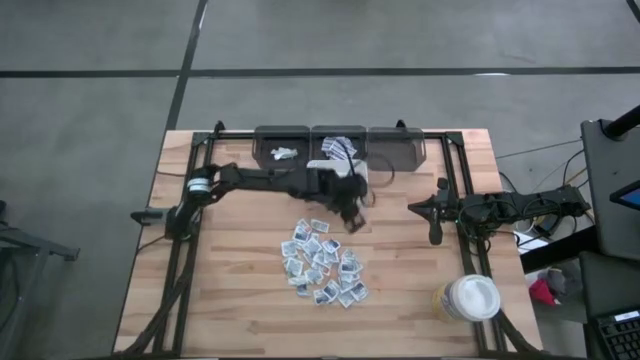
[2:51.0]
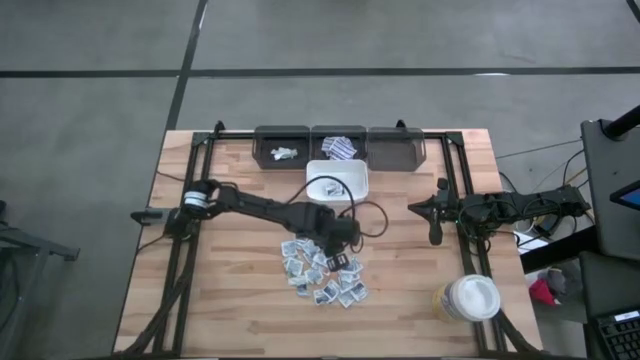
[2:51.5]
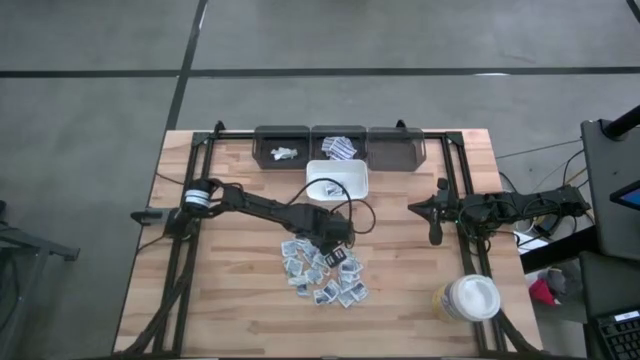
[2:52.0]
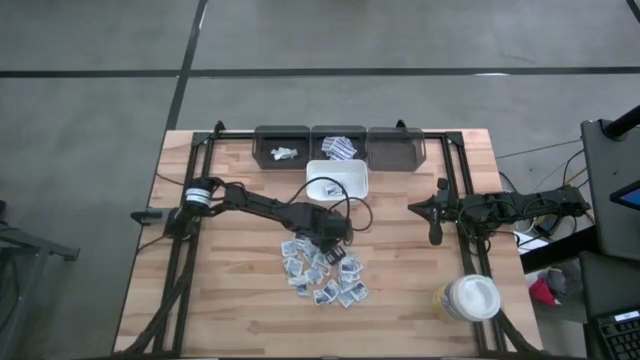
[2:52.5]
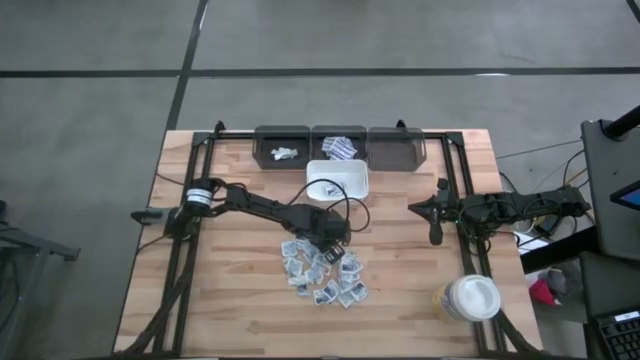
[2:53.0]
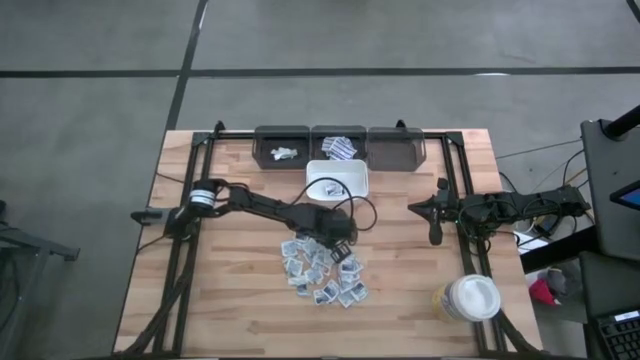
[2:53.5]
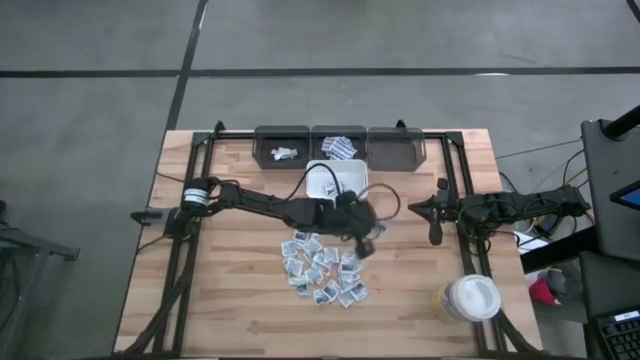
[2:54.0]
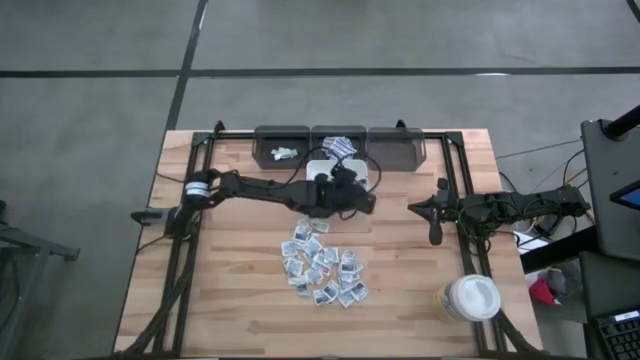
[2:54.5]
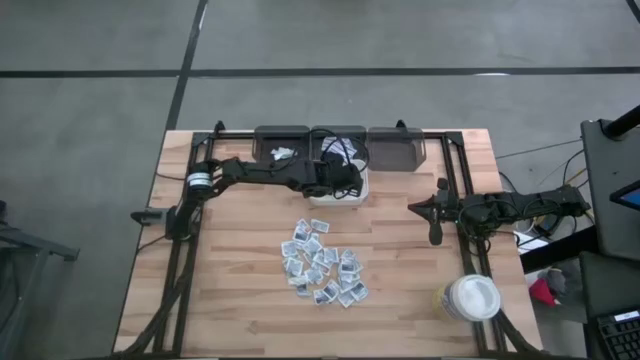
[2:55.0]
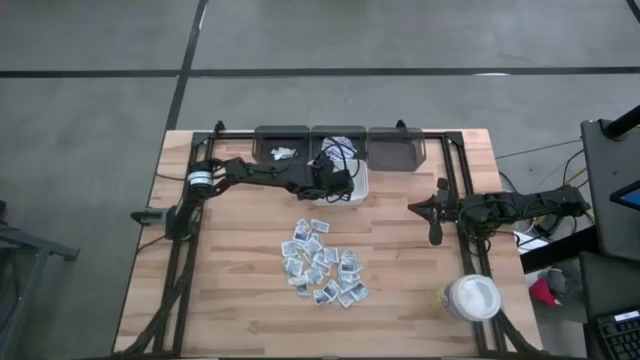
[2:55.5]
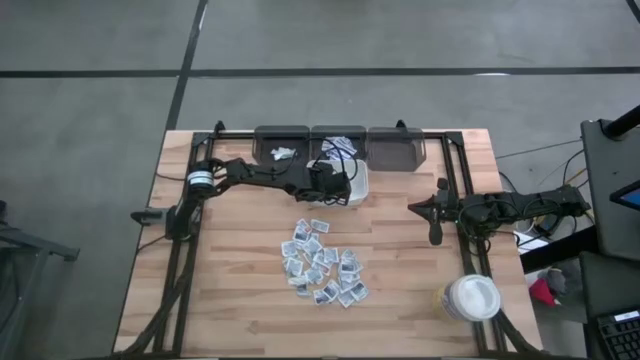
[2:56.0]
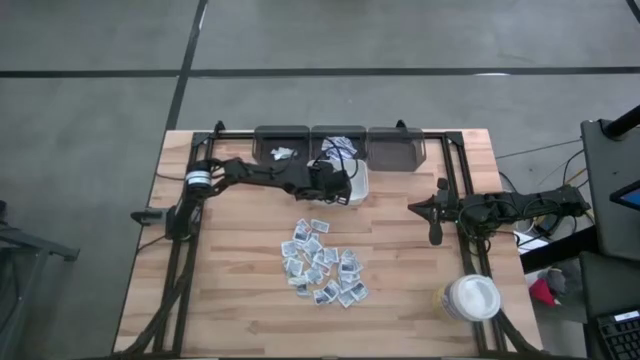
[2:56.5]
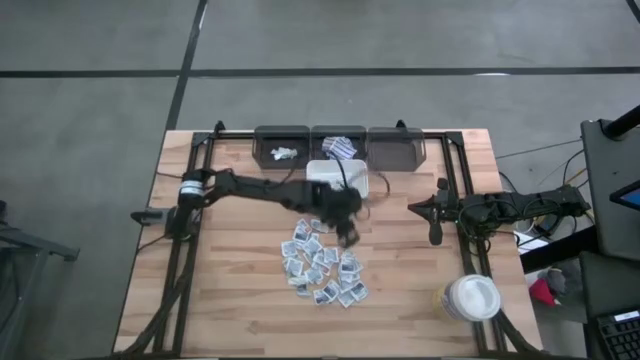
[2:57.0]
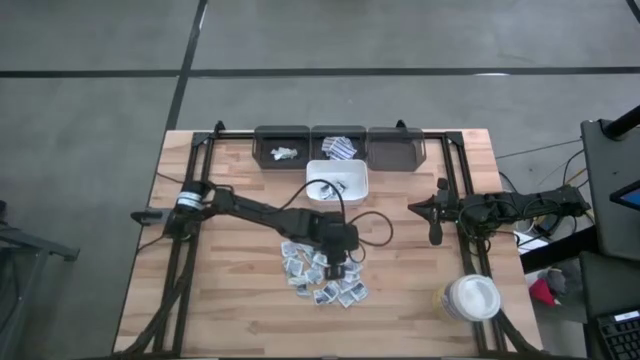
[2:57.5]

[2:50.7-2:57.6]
Task: Pick & Place First Aid Supplies
Put the blue alcohol pad into the white bin

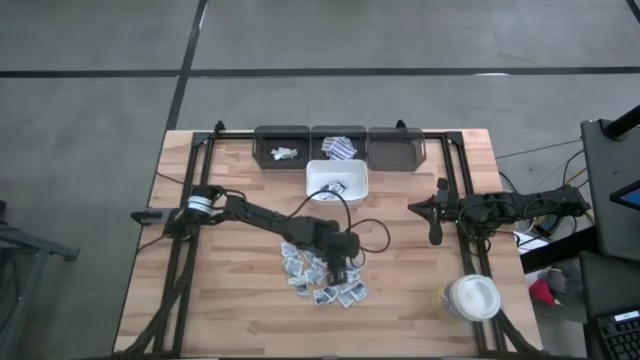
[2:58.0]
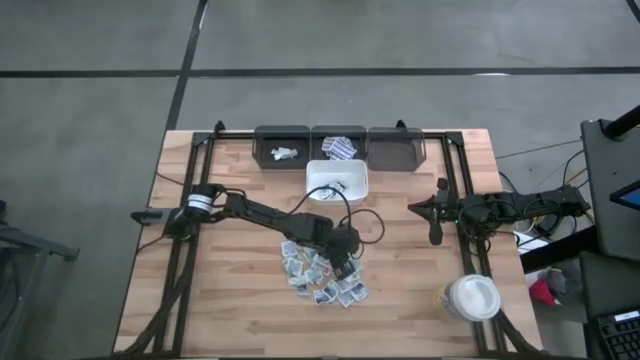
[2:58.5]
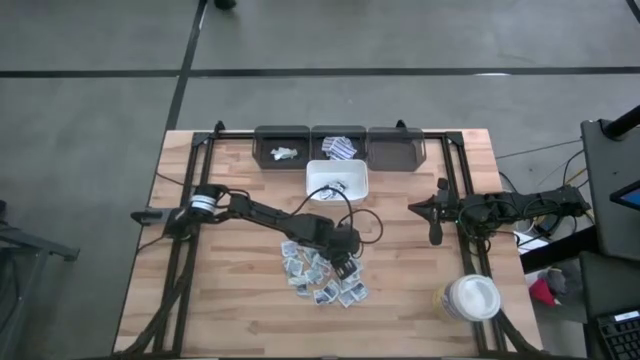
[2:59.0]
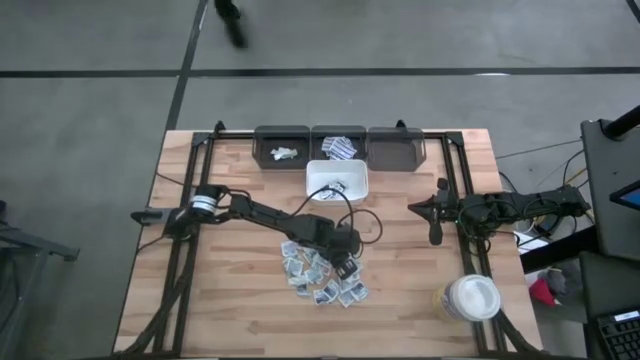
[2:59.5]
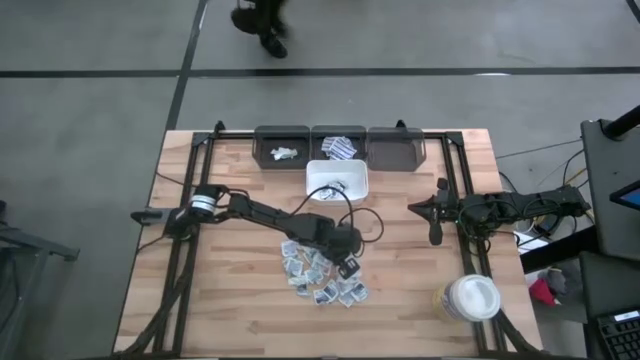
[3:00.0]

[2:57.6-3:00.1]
Put the blue alcohol pad into the white bin

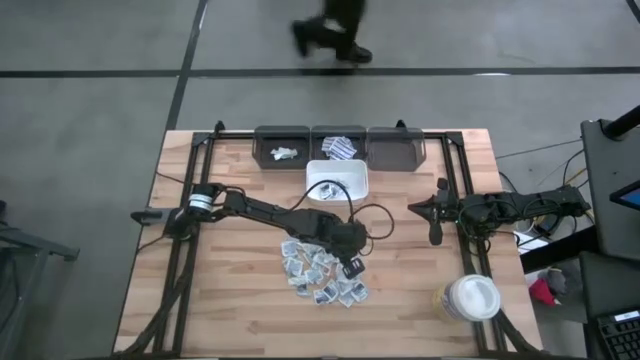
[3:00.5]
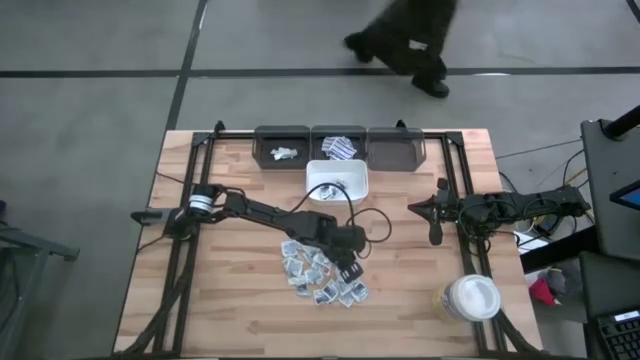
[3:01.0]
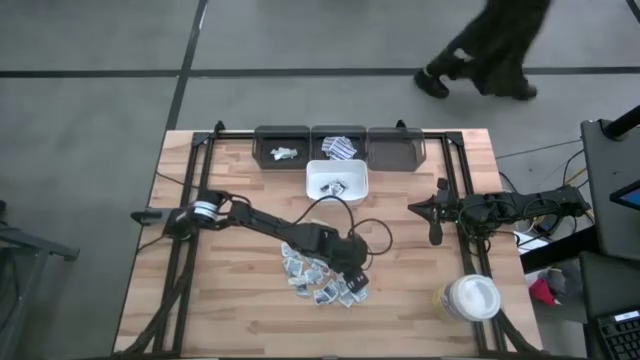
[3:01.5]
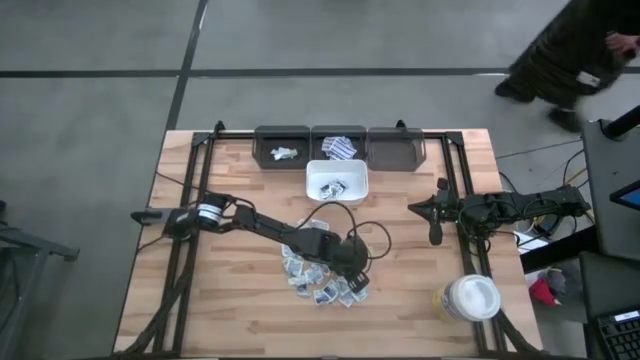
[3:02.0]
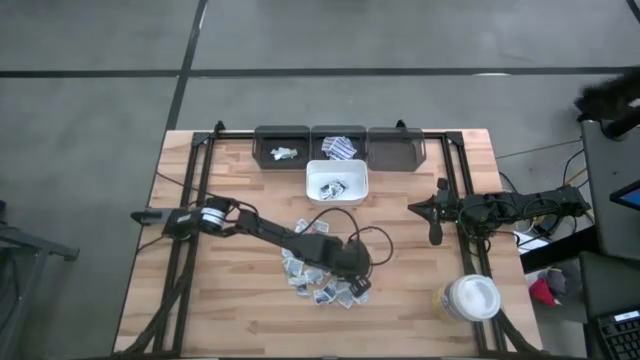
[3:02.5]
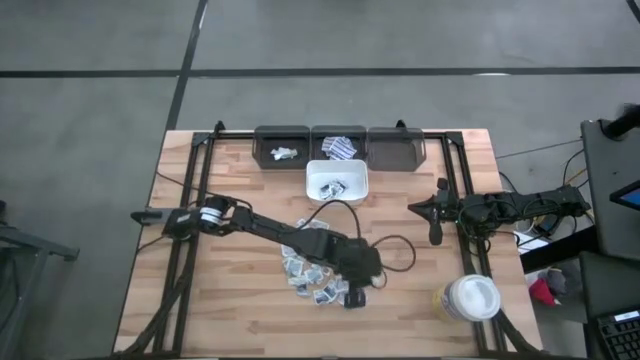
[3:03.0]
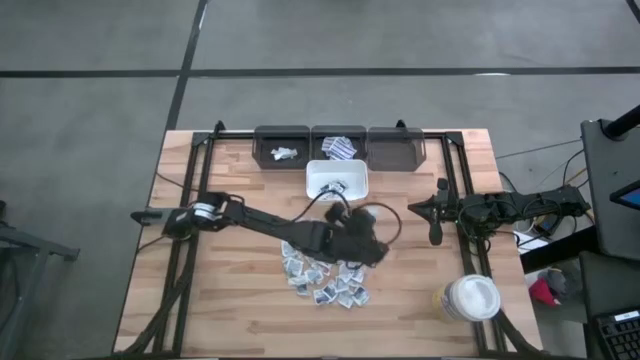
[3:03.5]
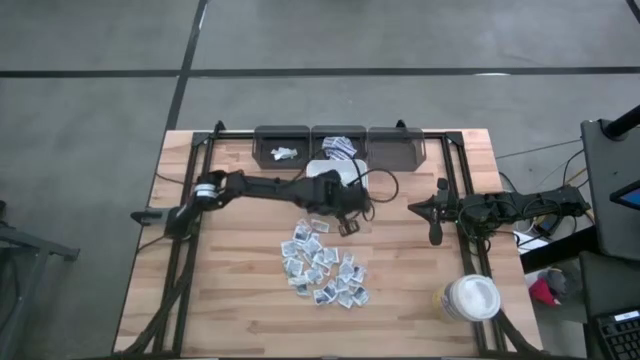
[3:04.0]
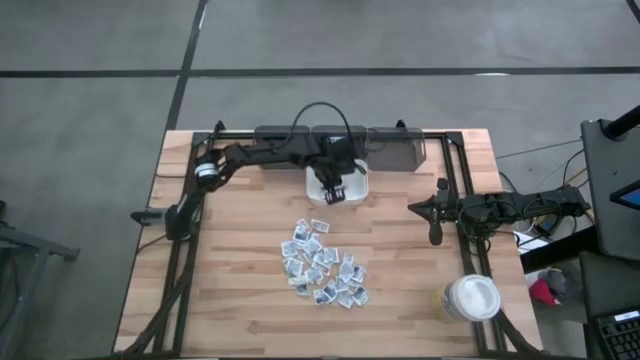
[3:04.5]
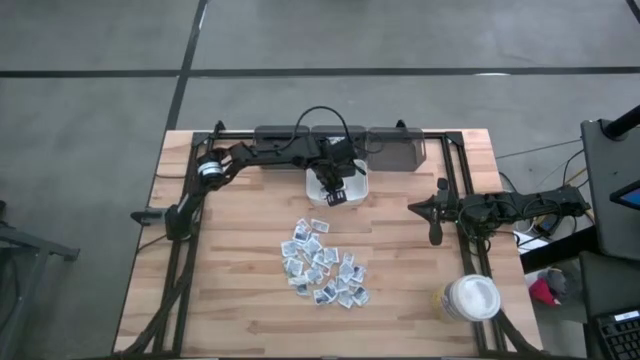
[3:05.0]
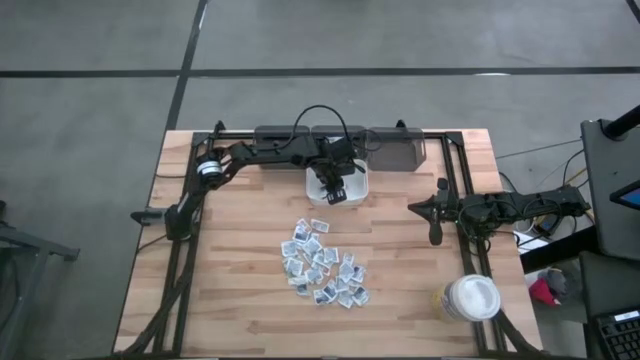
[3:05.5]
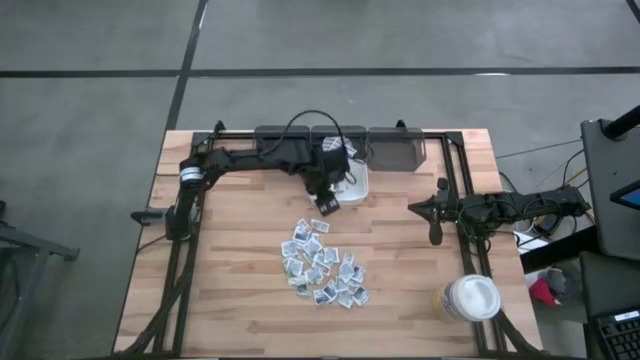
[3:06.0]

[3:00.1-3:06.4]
Put the blue alcohol pad into the white bin

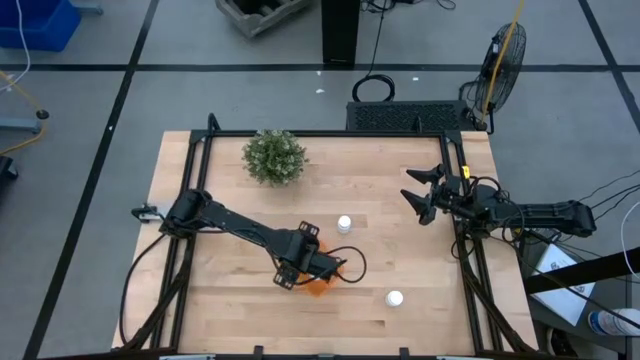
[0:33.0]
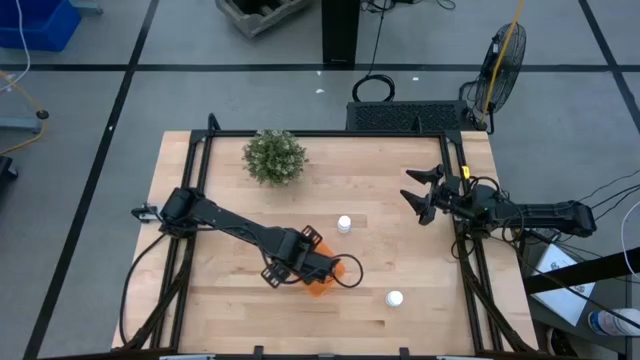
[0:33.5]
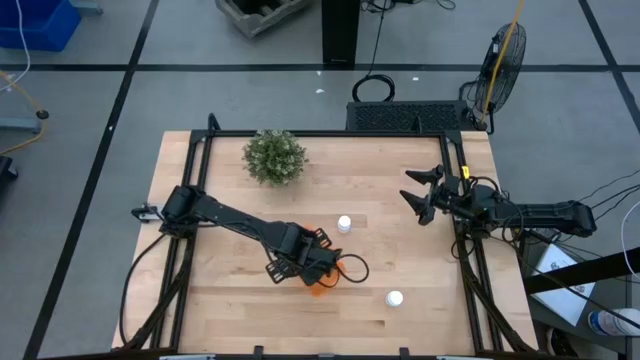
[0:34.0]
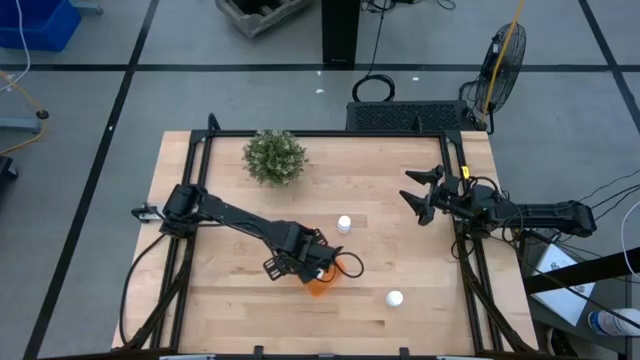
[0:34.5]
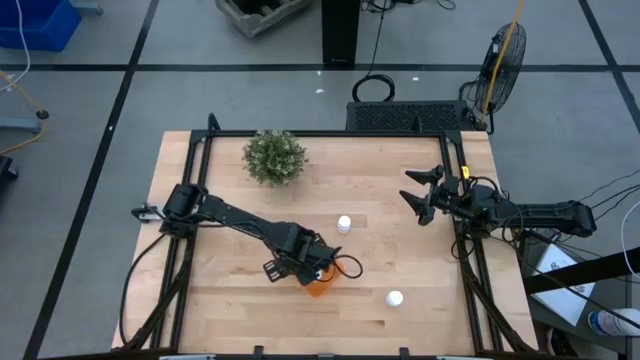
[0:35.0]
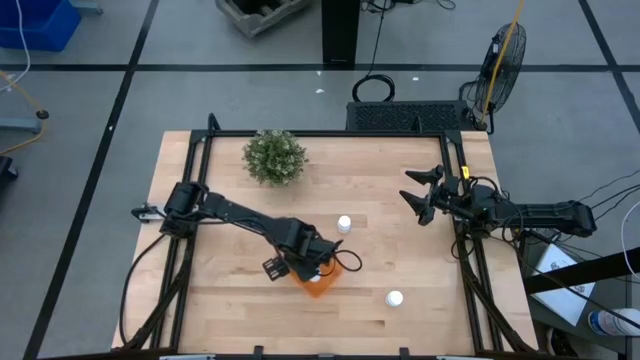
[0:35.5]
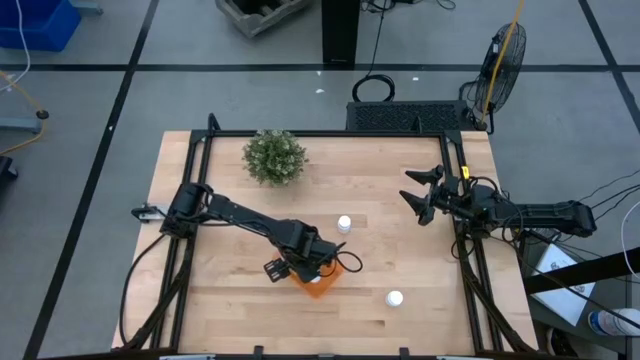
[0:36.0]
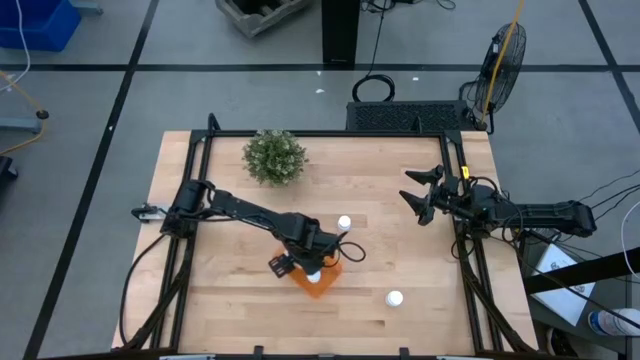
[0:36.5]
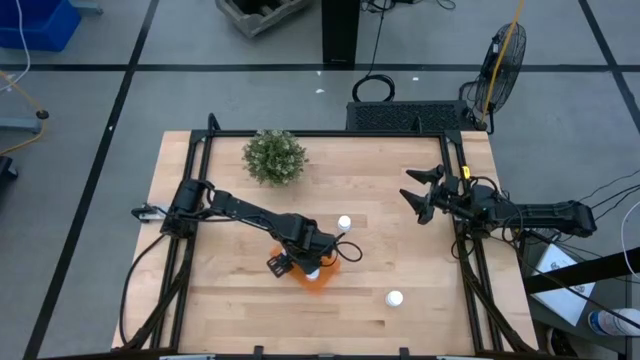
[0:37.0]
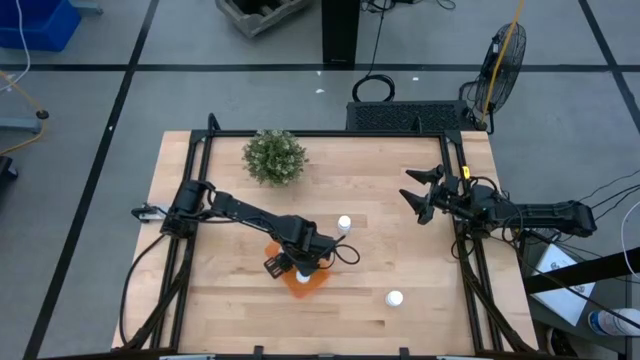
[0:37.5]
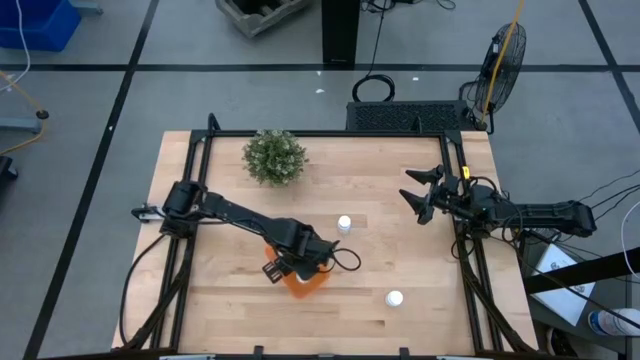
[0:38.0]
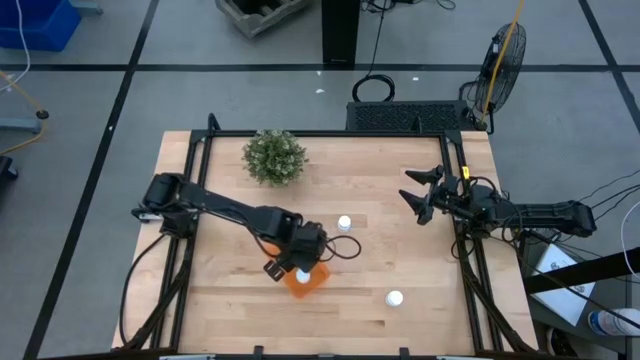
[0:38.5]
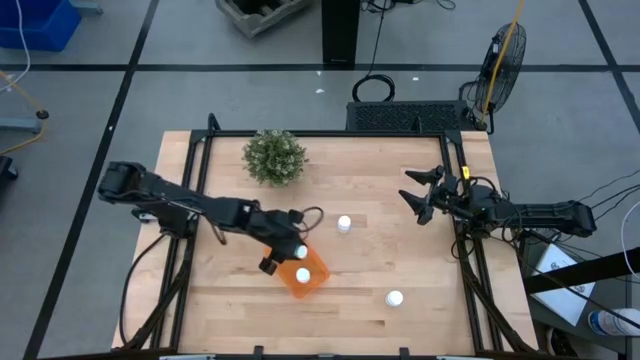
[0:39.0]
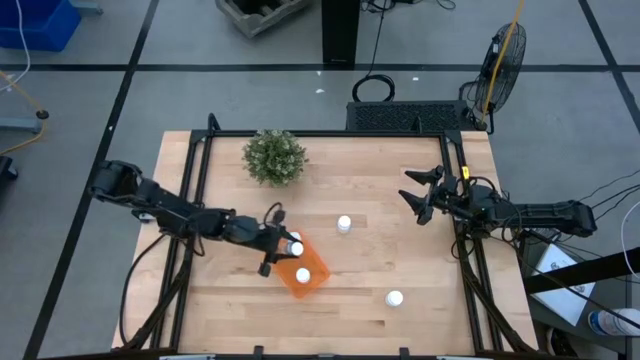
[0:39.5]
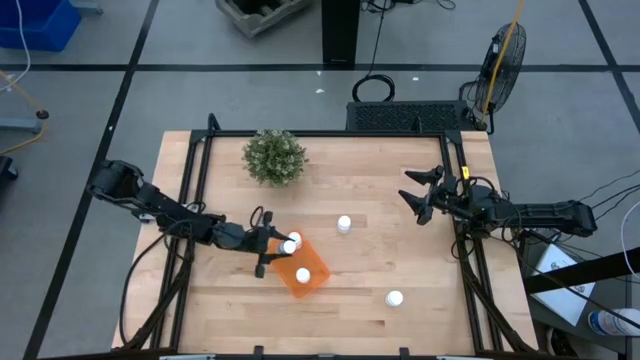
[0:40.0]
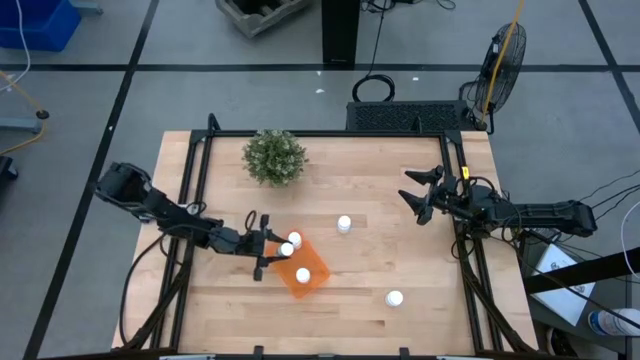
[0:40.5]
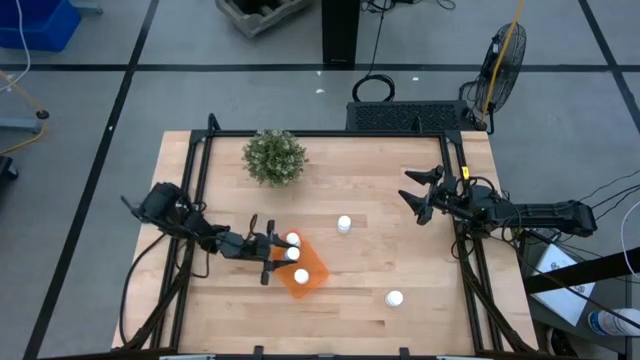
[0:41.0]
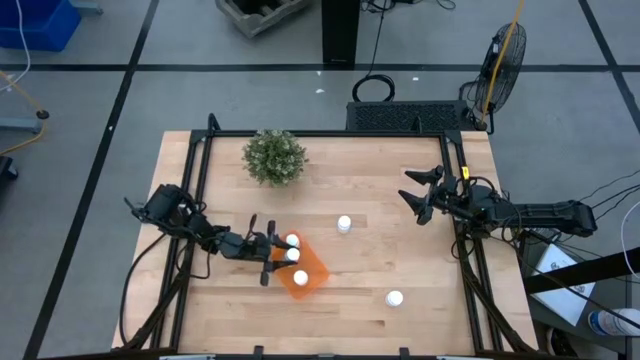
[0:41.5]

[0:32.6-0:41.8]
Task: Pick and place pill bottles into a basket
Adjust the white medicine bottle in the orange bin
